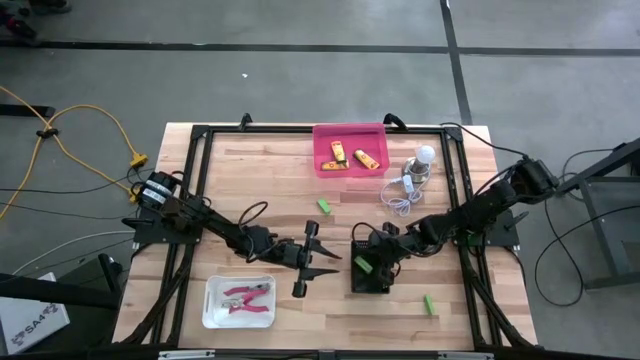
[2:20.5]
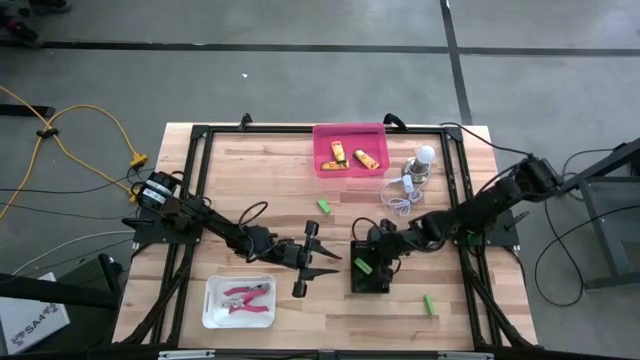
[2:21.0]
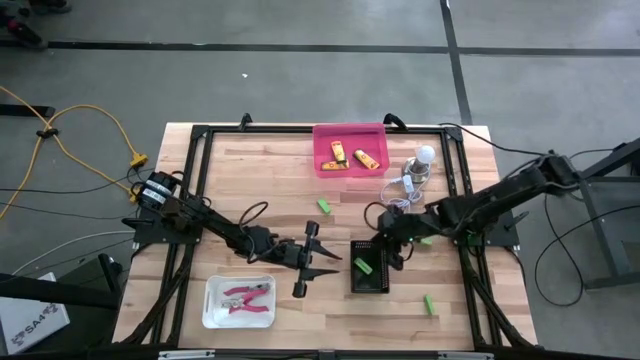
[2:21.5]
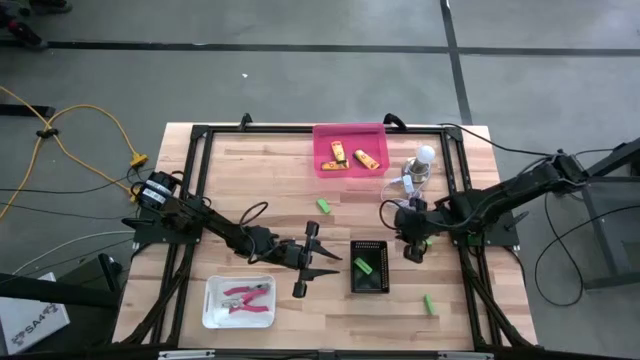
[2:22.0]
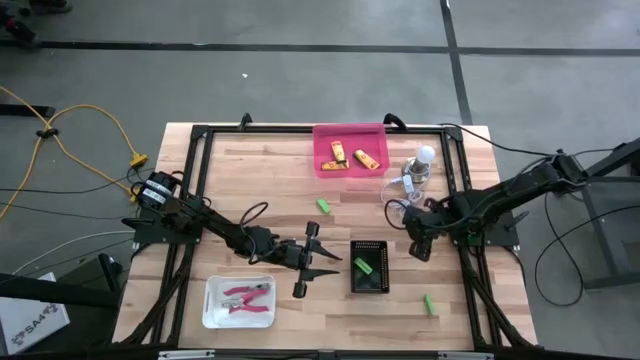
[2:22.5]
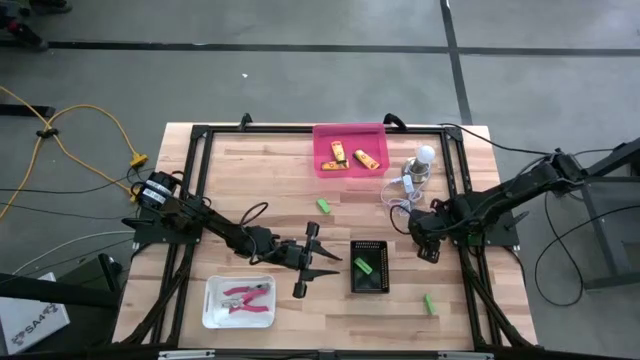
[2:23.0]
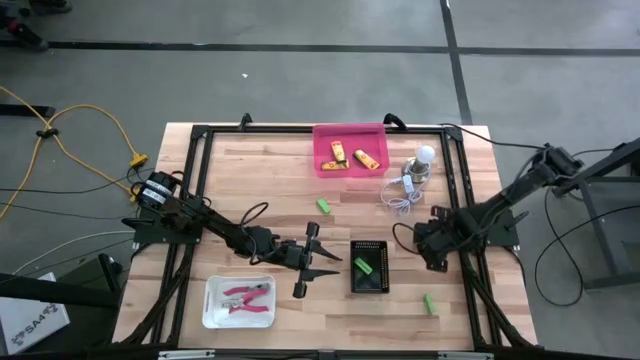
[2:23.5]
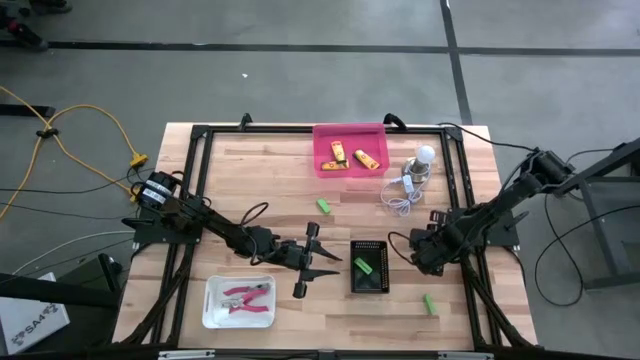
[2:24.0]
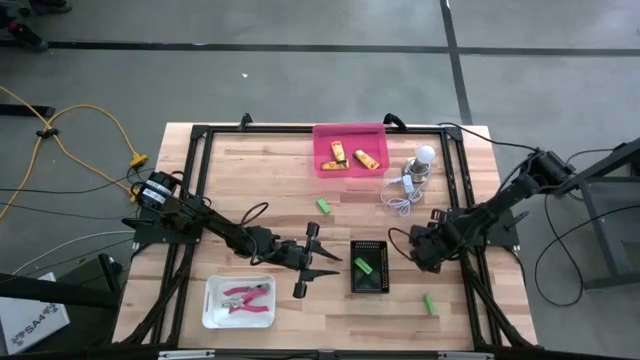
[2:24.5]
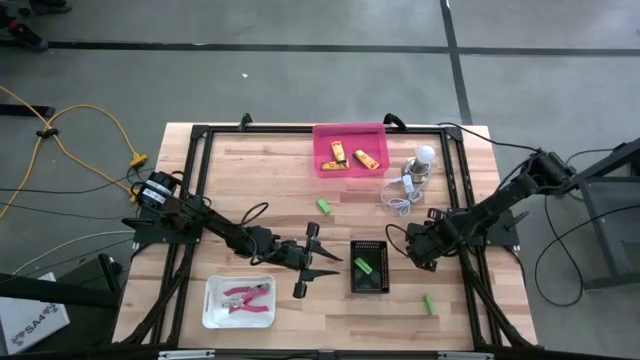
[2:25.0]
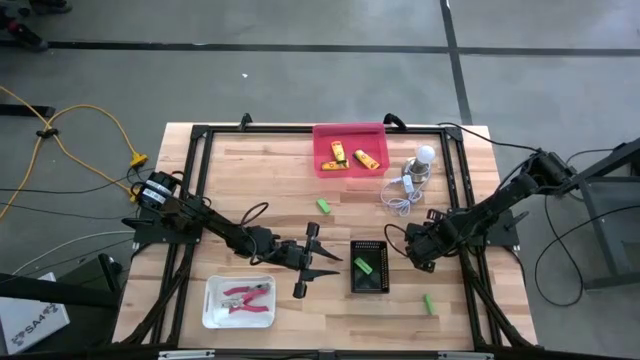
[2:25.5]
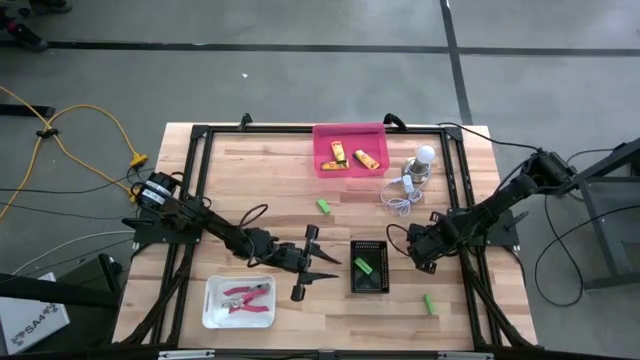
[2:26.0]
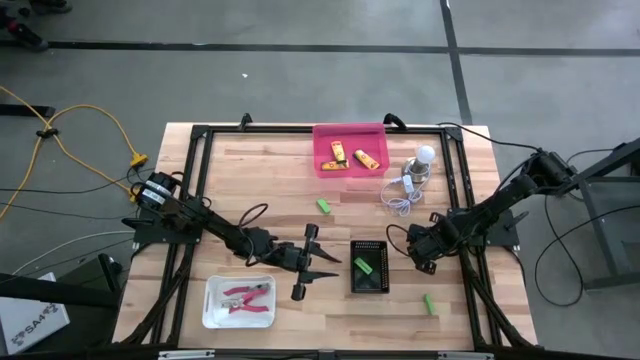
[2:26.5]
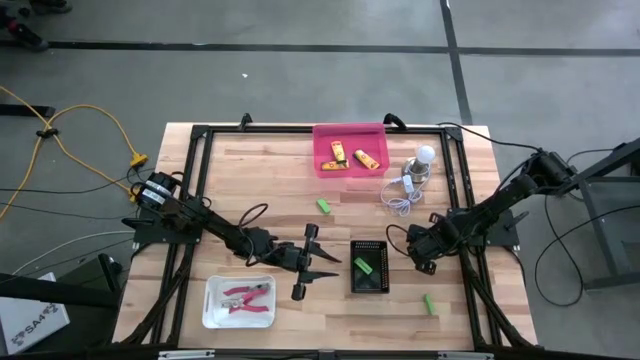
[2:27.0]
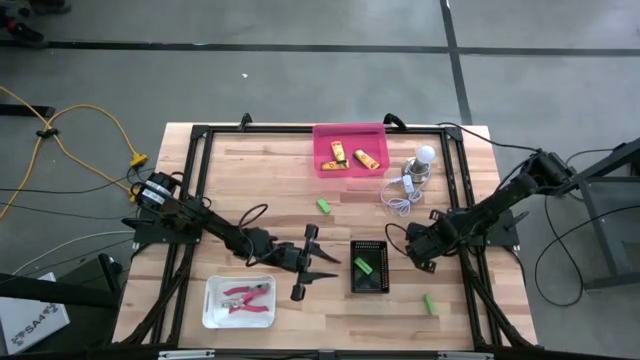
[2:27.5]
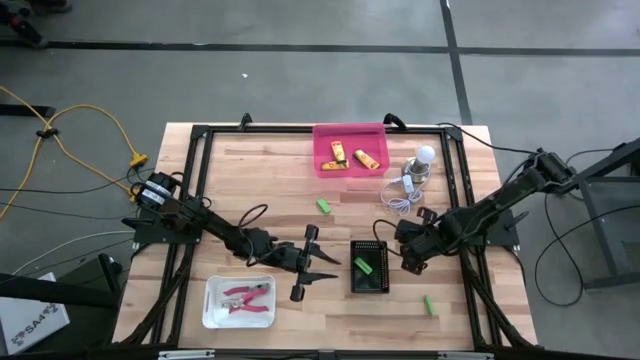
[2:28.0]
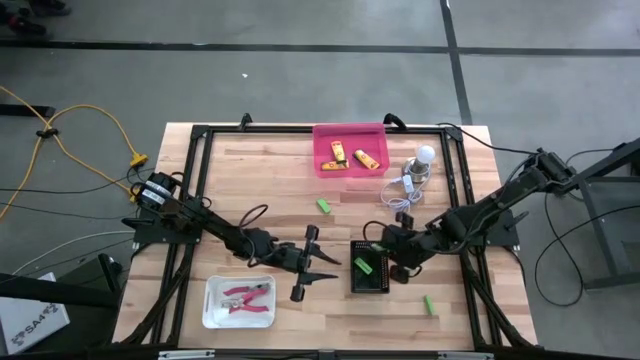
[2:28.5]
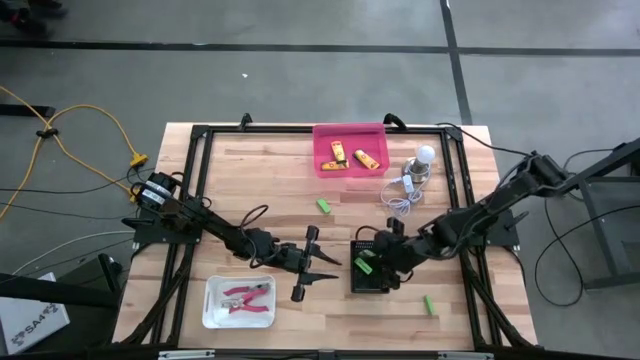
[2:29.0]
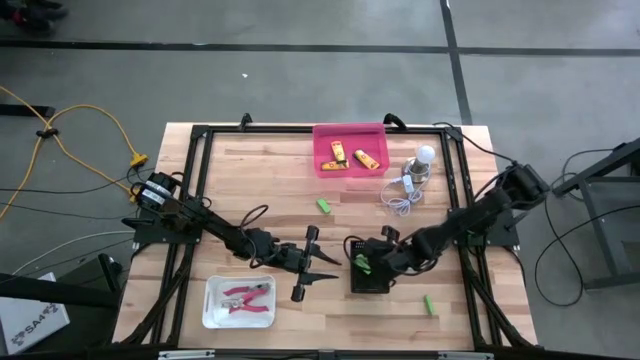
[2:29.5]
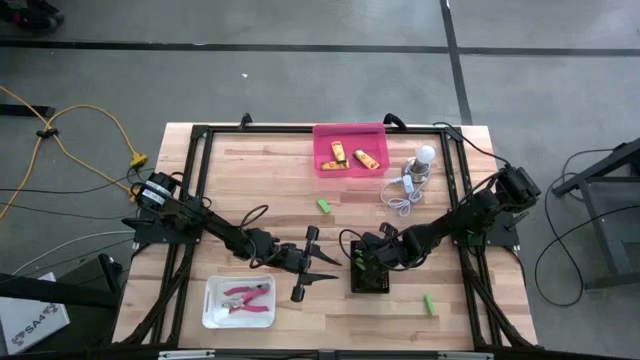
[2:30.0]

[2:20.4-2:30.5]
Task: Pick & Place School Supplies
Put the green eraser into the black bin

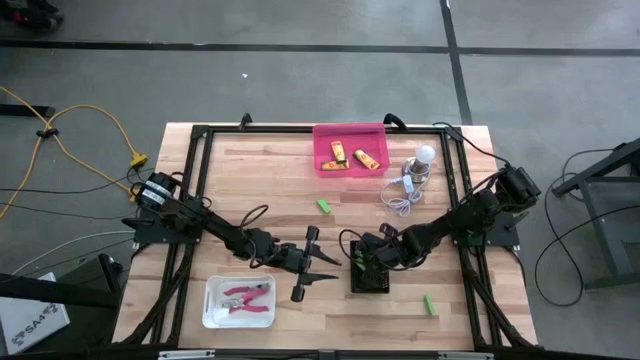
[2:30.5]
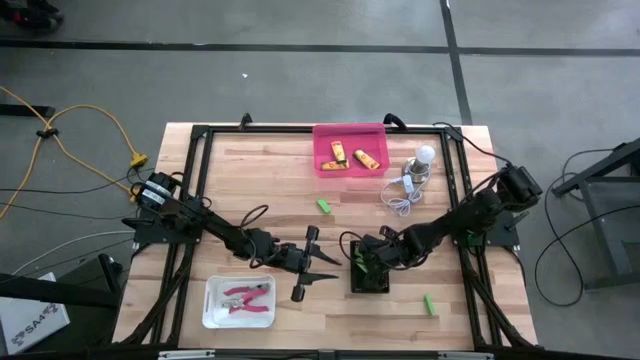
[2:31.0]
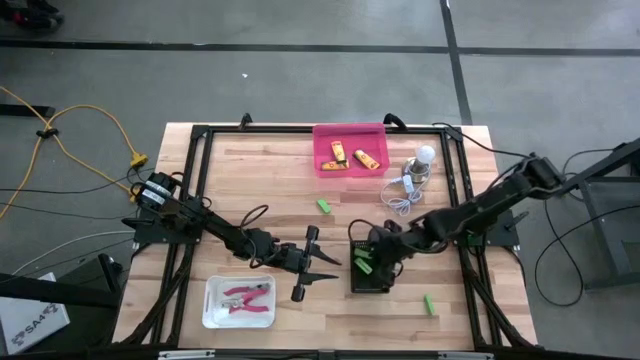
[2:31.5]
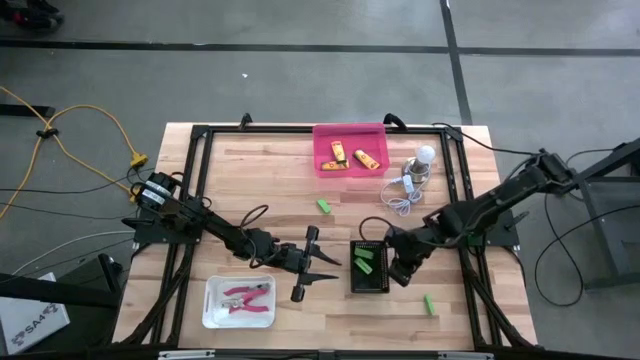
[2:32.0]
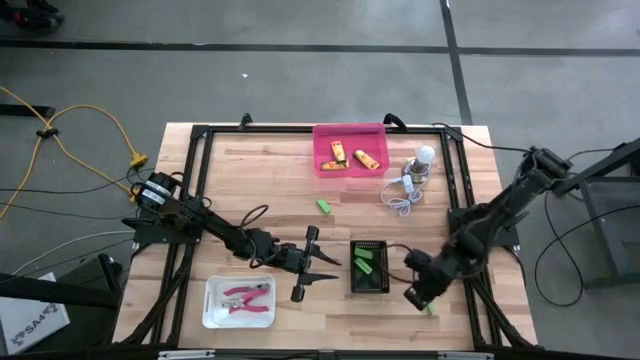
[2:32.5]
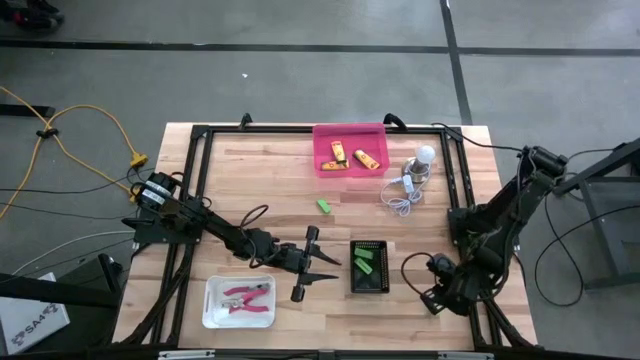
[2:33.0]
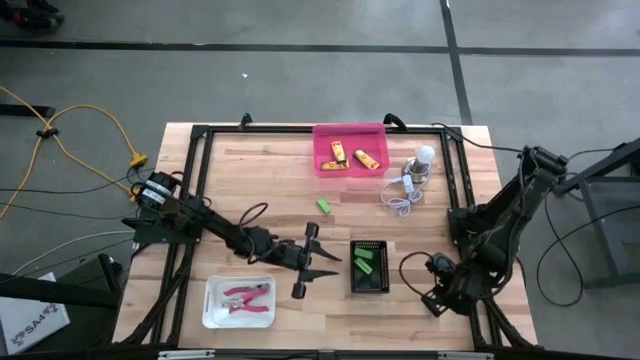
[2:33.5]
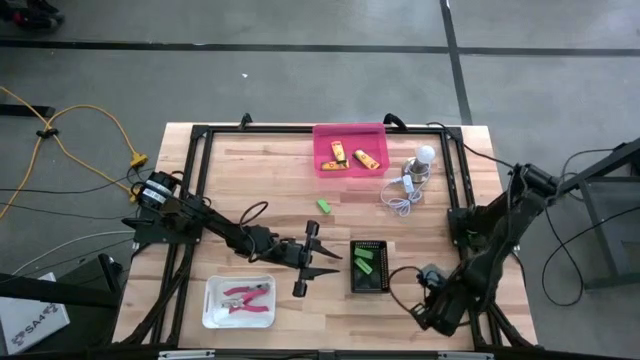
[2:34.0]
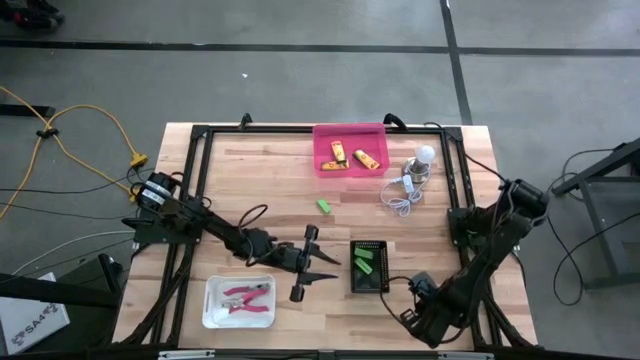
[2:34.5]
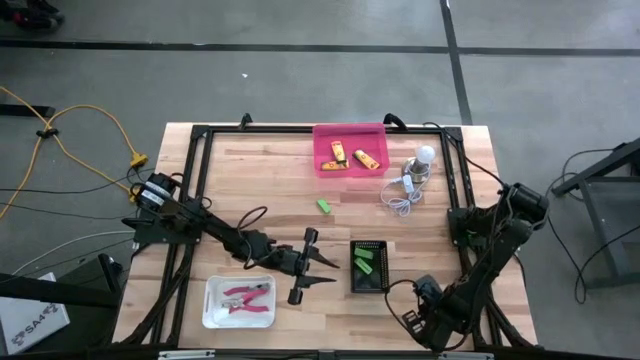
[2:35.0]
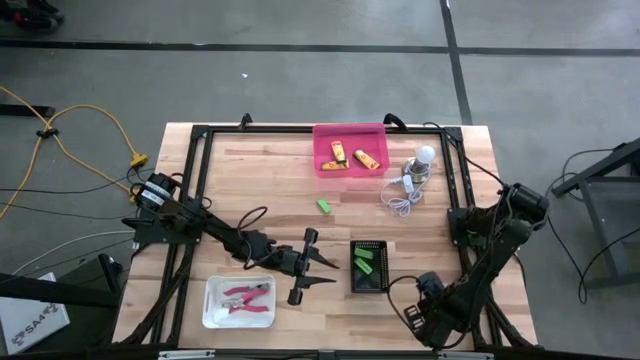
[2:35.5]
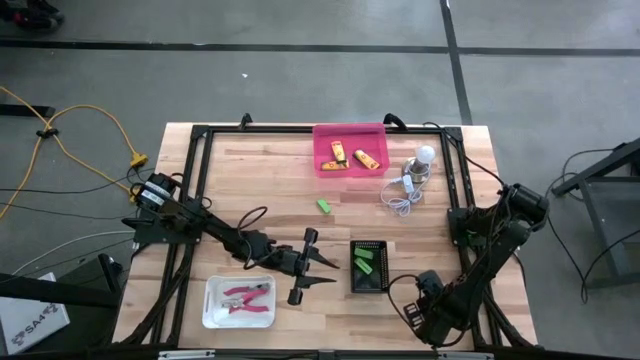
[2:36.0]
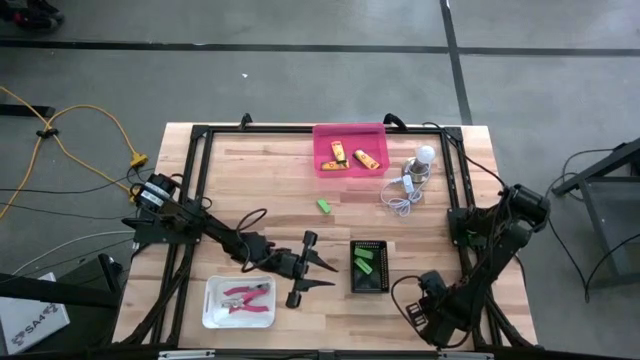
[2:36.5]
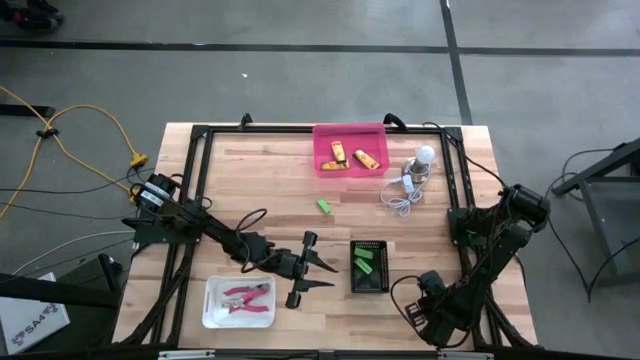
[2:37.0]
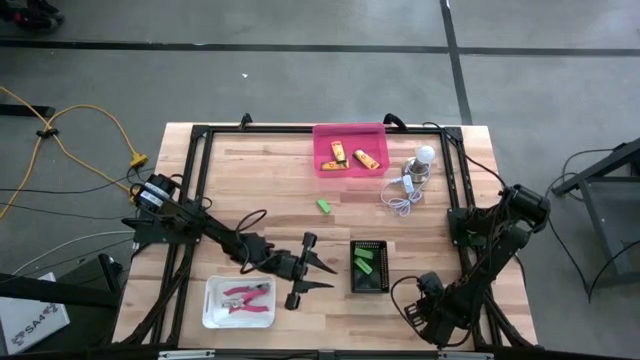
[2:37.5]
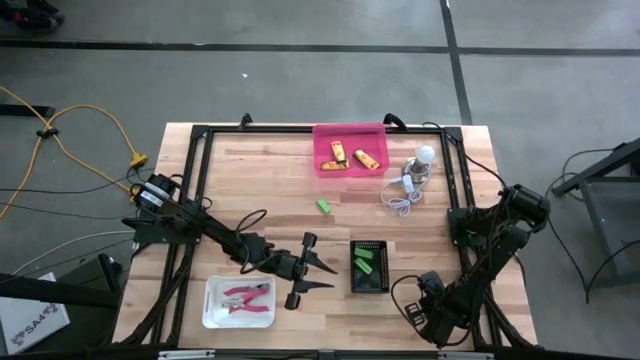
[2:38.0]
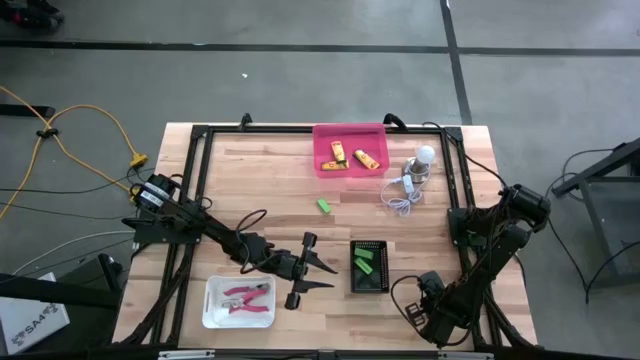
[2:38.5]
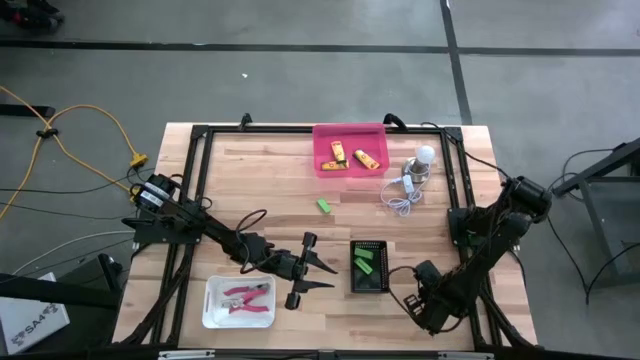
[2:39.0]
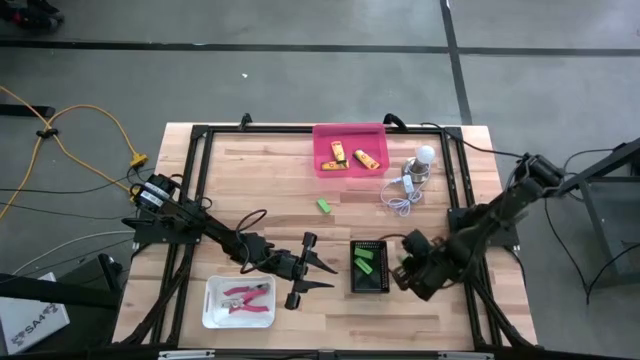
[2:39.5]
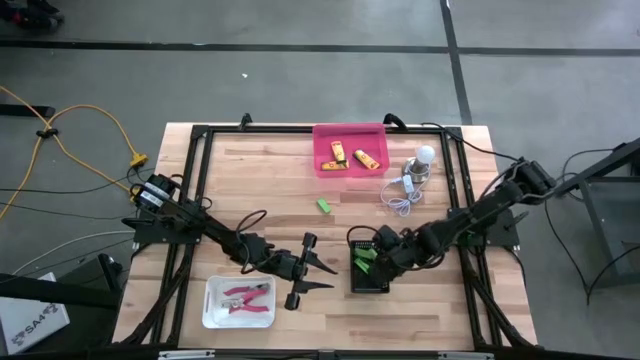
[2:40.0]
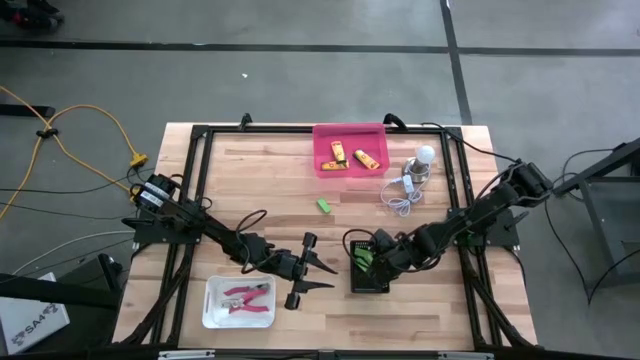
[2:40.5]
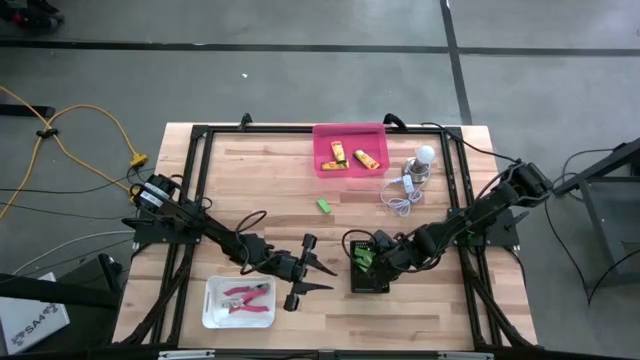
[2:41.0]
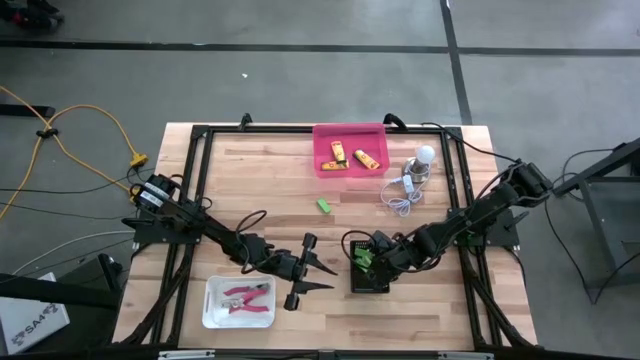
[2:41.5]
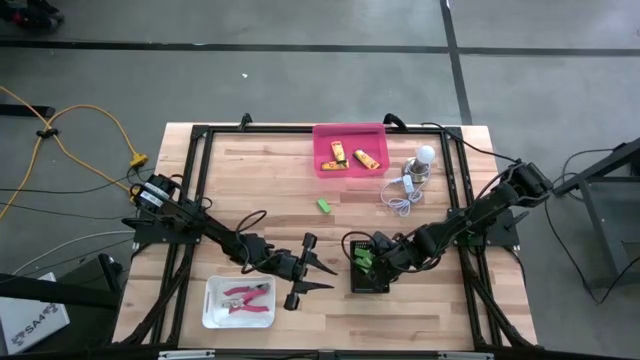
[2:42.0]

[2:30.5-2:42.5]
Put the green eraser into the black bin
